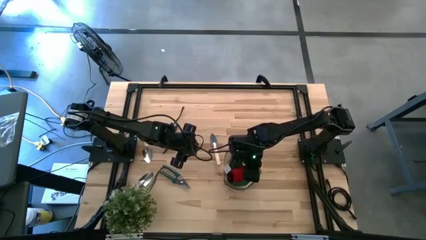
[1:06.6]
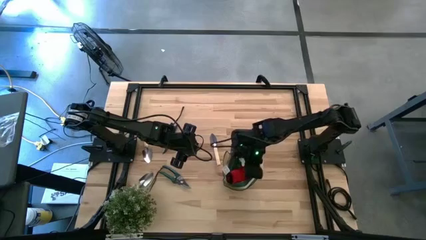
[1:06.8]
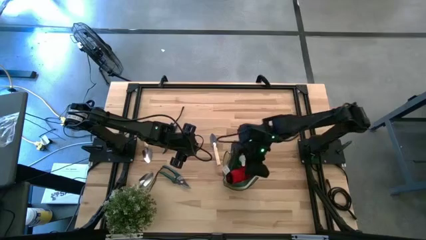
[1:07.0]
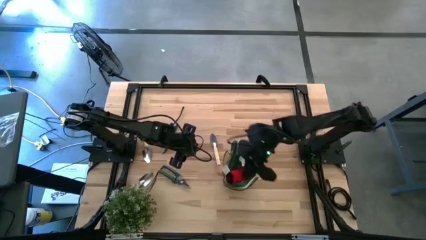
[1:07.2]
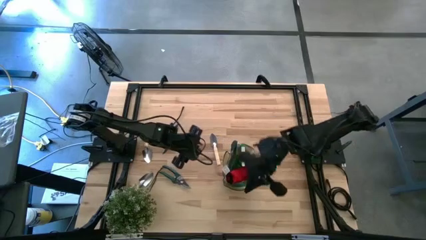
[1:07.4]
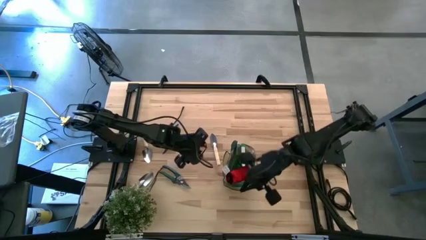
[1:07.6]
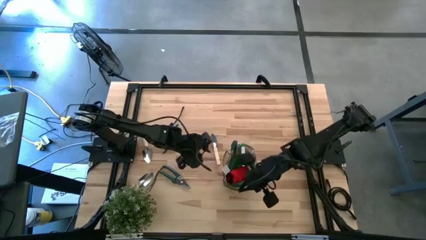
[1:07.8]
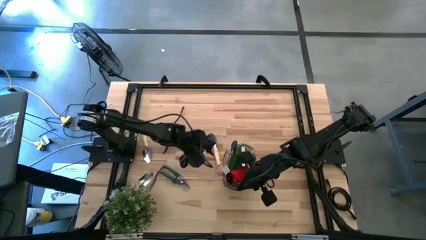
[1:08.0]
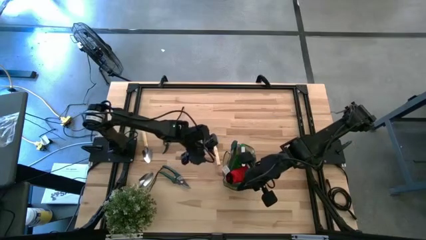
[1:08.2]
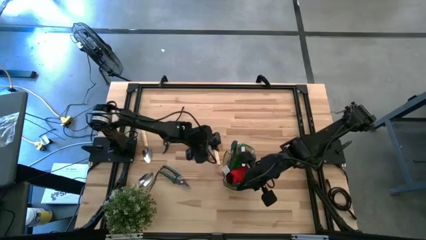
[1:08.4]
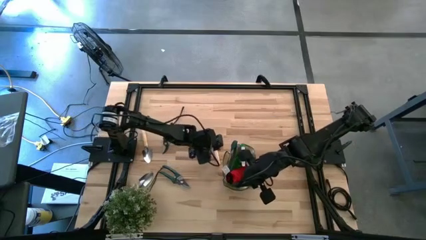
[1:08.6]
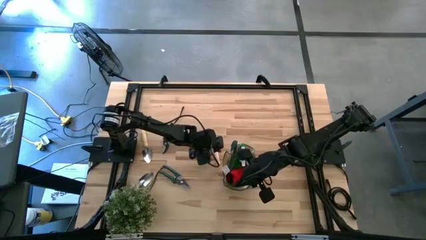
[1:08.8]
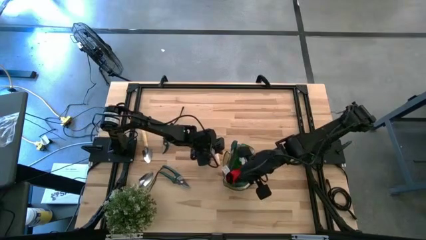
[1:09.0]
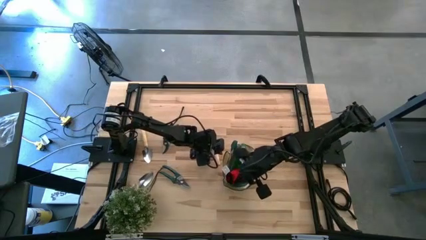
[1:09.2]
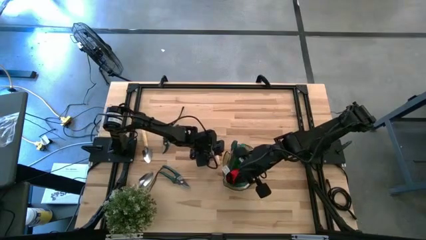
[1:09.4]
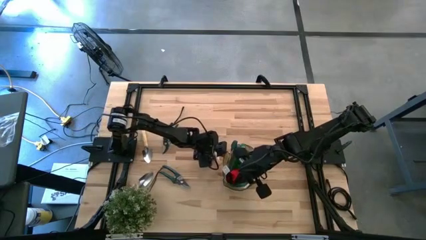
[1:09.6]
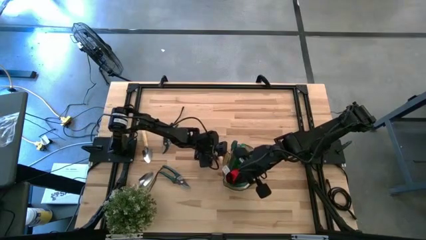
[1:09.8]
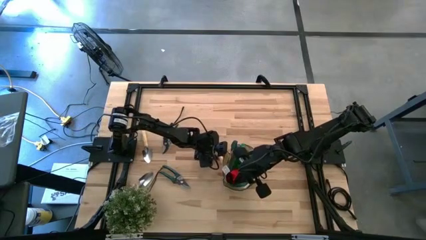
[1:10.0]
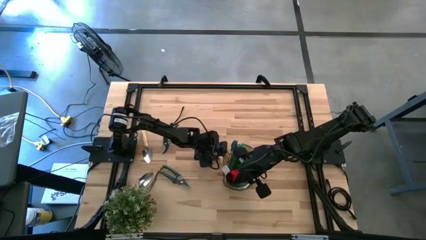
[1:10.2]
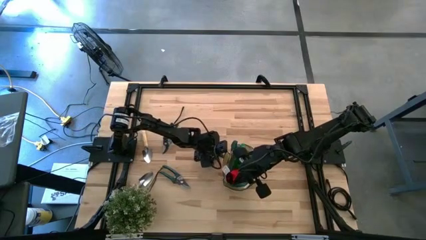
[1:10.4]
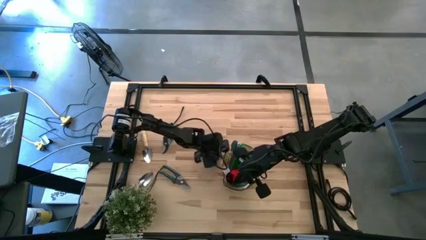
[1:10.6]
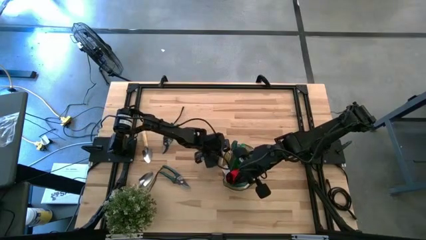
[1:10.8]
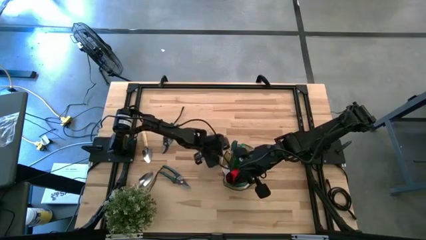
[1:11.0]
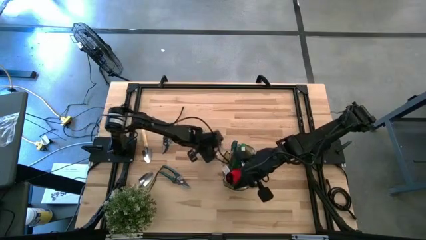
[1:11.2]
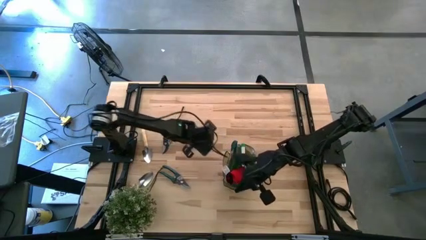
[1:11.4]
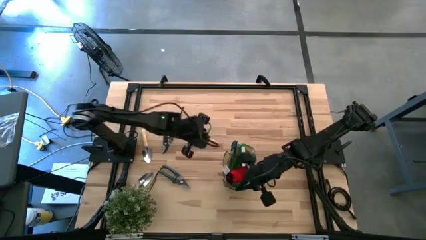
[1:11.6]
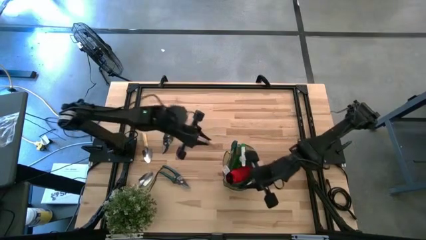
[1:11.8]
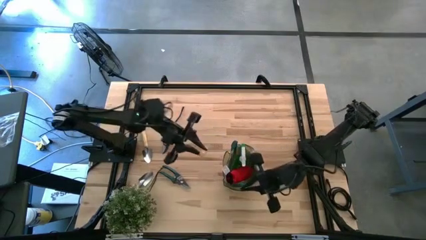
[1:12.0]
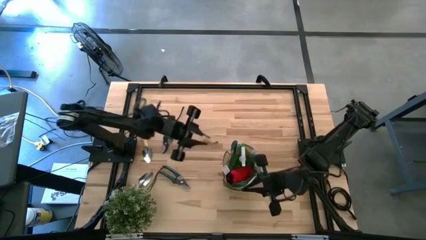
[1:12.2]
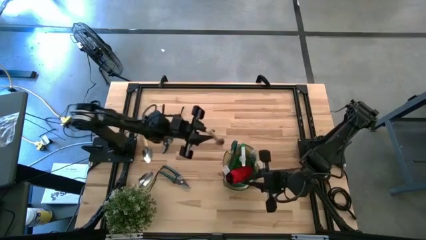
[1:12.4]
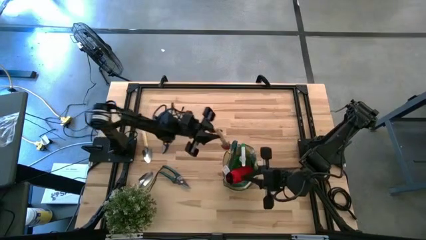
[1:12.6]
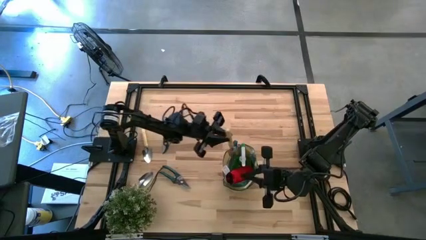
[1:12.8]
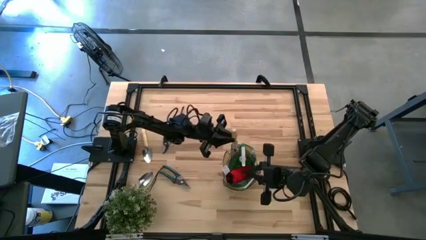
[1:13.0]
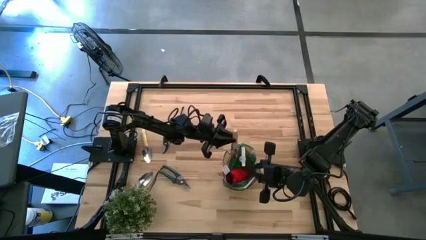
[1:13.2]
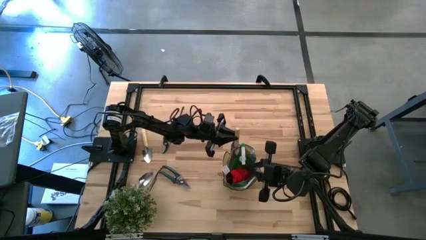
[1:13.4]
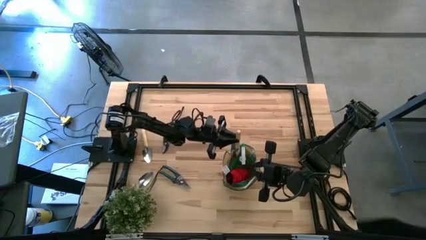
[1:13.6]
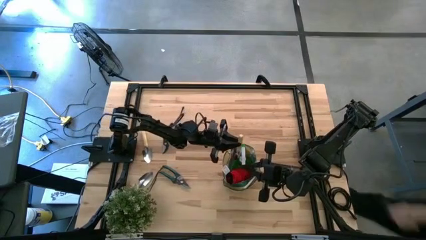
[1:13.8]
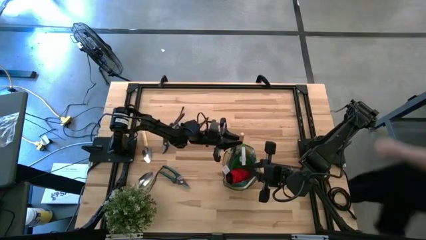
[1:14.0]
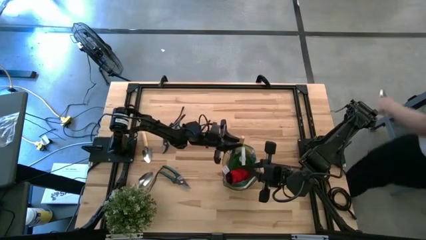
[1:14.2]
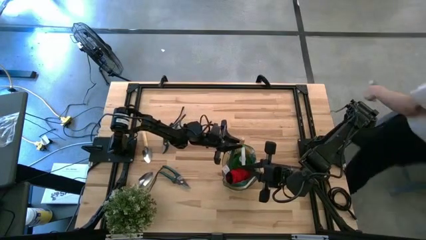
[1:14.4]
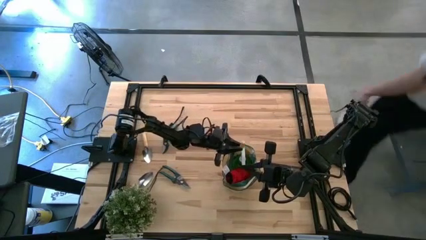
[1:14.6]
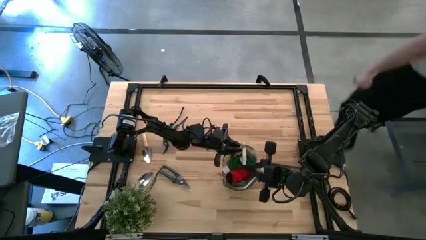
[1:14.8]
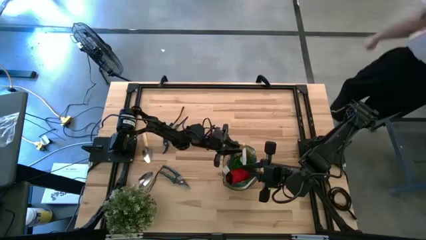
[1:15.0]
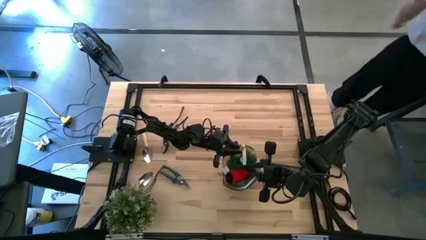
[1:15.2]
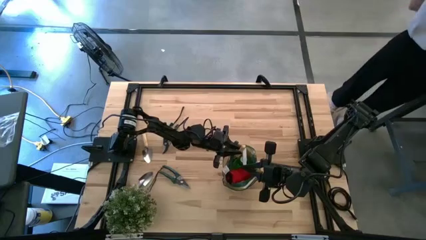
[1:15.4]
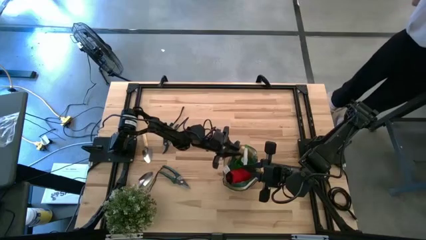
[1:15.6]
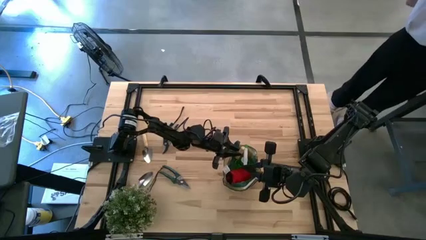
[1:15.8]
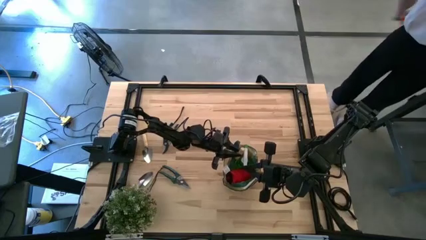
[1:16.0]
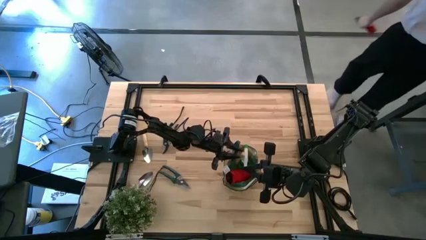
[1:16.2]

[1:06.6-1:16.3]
Task: Pick & Place Garden tools in Gardening bag
Put the middle right brown trowel into the green gardening bag

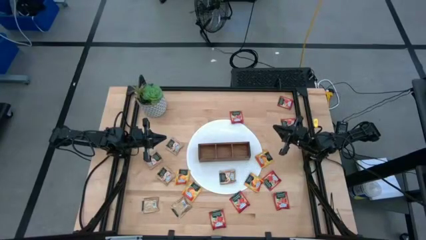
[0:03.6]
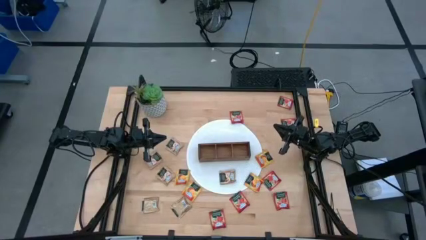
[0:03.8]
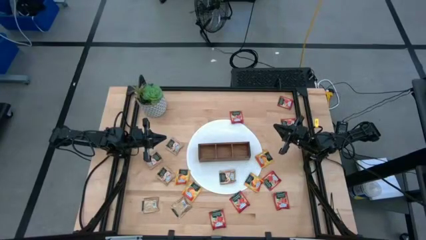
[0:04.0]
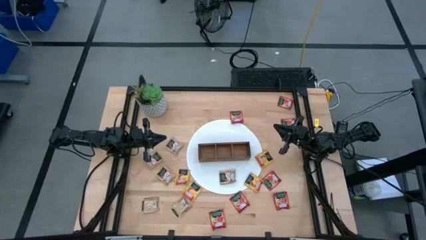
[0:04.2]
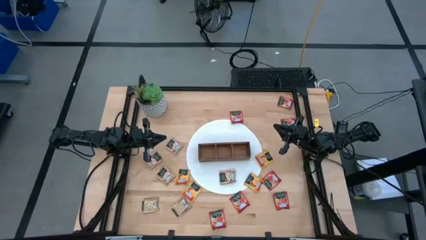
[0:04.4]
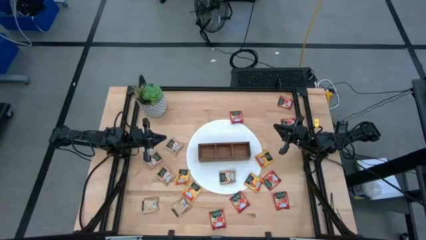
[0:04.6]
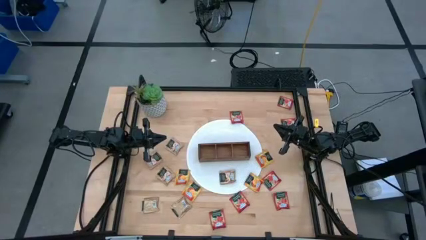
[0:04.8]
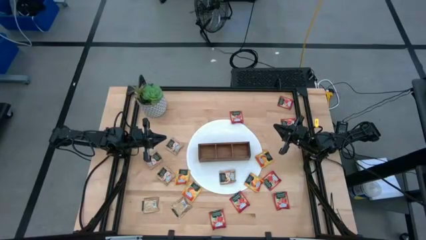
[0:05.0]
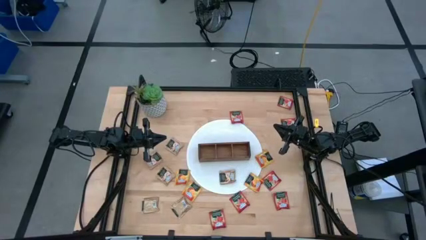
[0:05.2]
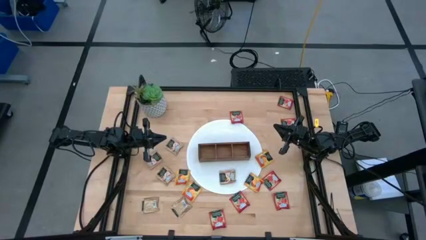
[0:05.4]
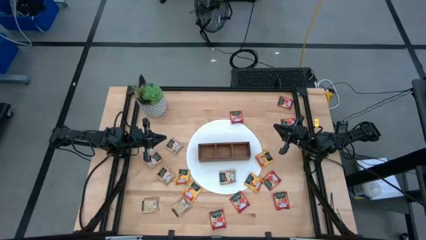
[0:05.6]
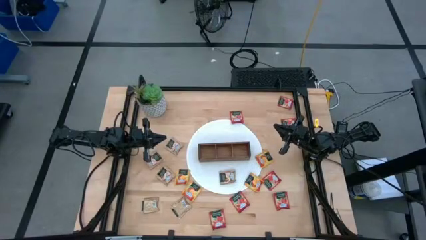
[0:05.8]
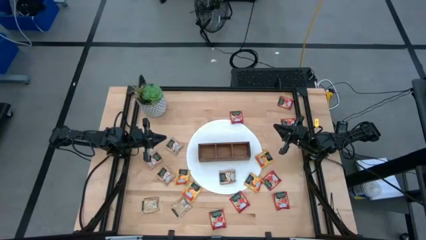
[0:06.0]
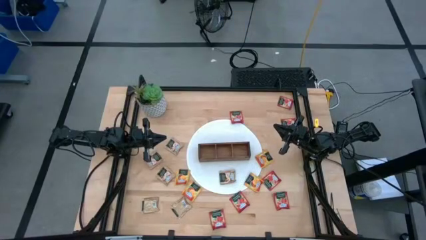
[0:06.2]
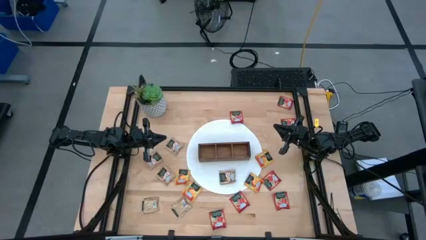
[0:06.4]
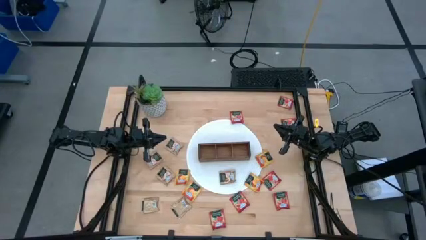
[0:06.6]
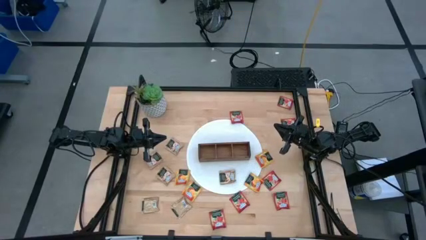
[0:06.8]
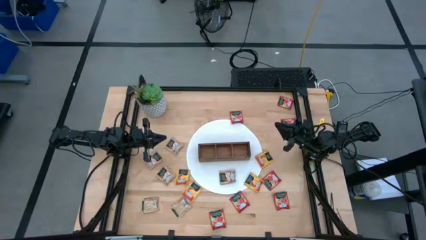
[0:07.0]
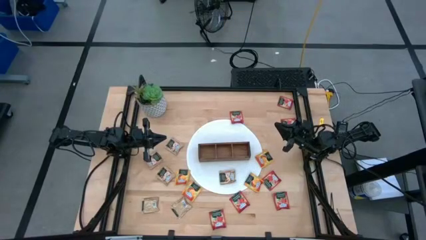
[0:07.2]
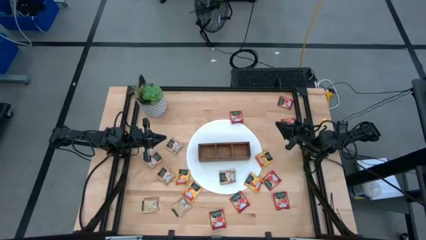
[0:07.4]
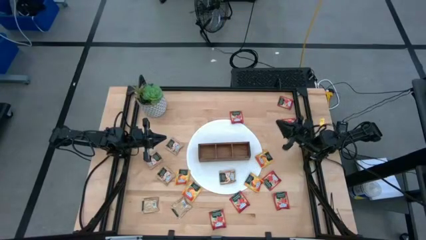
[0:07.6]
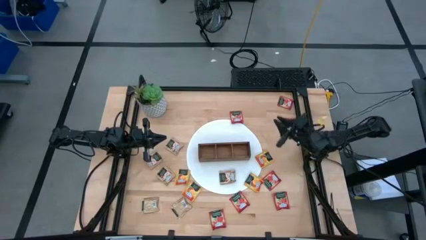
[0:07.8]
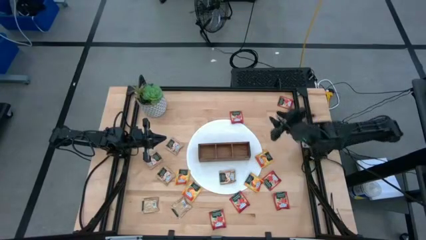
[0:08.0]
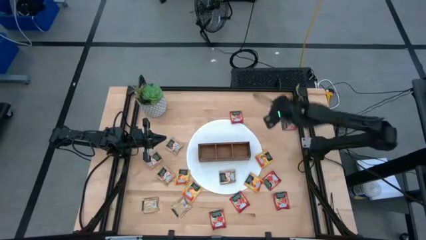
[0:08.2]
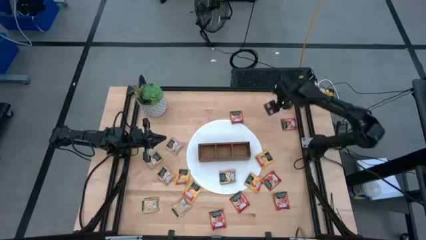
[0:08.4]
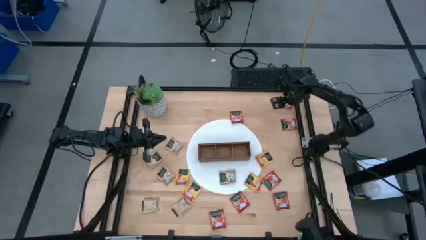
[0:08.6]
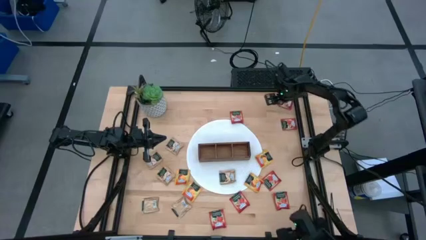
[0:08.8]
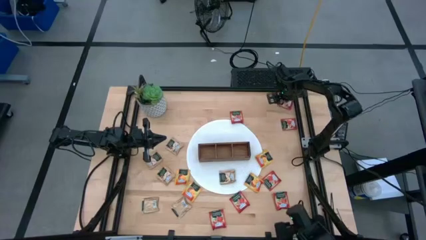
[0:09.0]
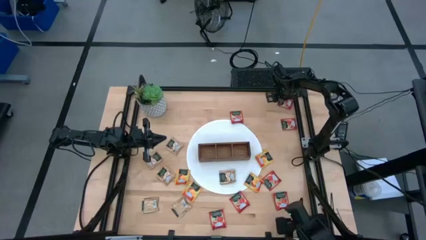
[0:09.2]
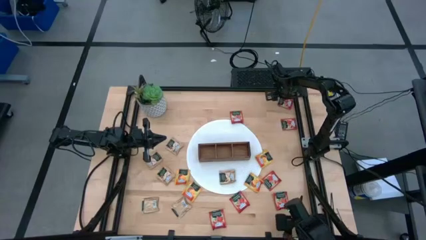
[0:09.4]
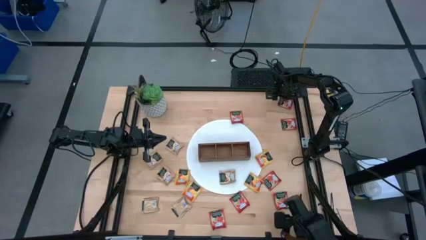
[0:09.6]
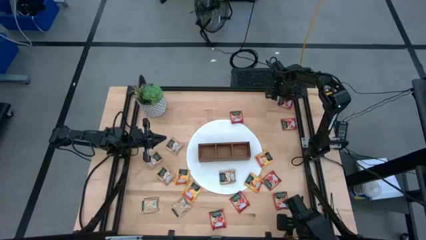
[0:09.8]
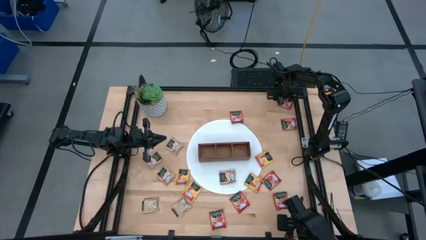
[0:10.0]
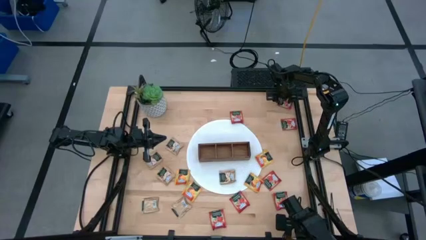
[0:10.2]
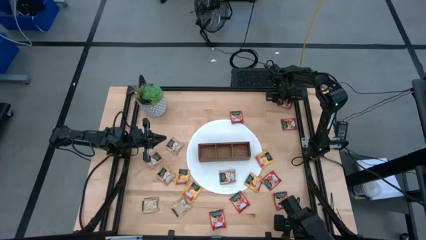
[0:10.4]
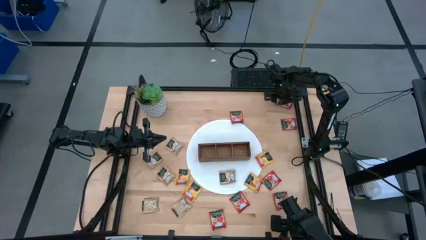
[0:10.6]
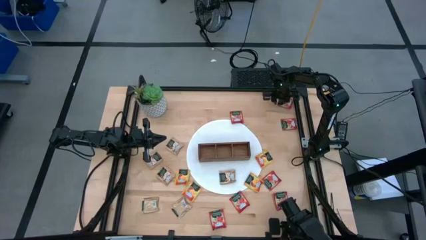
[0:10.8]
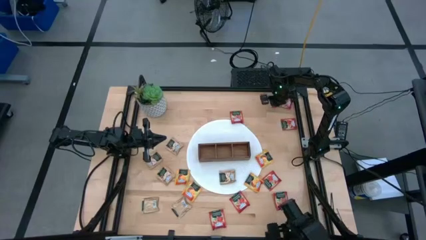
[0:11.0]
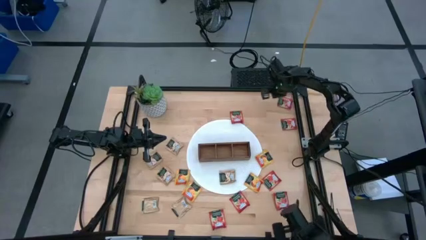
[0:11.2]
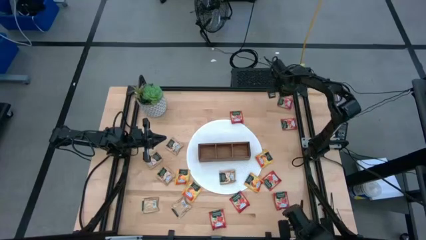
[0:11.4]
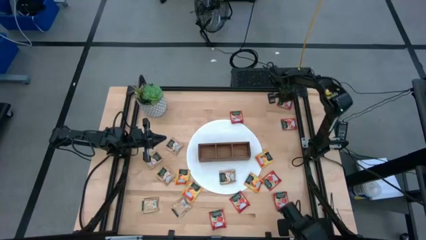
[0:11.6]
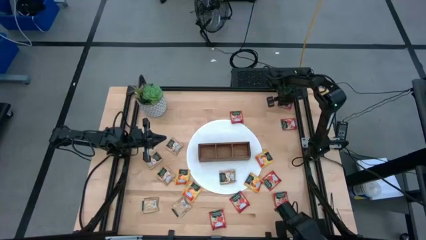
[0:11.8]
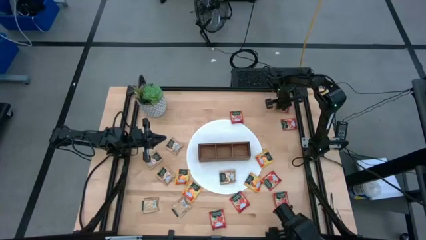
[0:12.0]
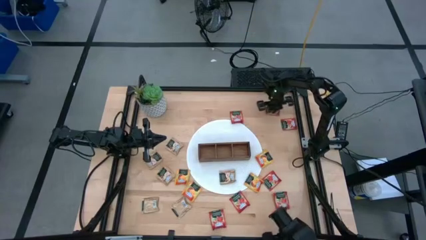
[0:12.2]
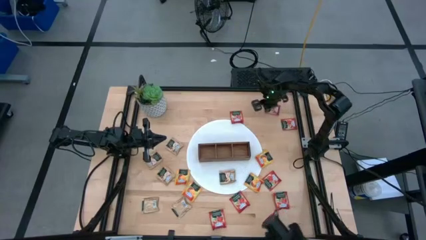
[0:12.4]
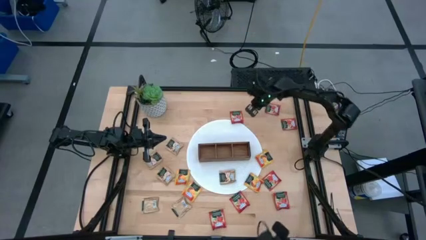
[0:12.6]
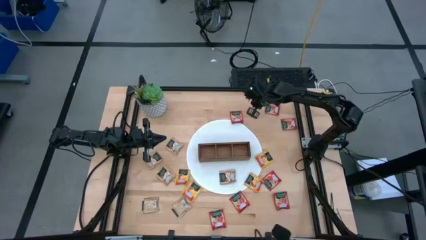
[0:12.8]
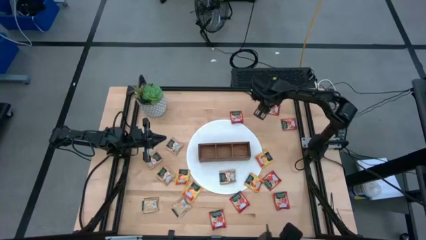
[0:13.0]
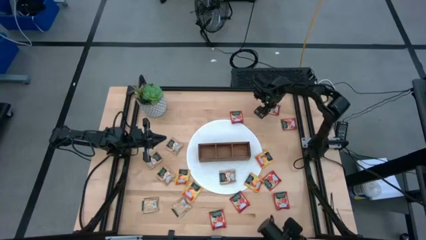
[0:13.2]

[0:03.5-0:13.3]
Task: Pick & Place Tea
Put the red tea bag into the middle section of the wooden organizer
